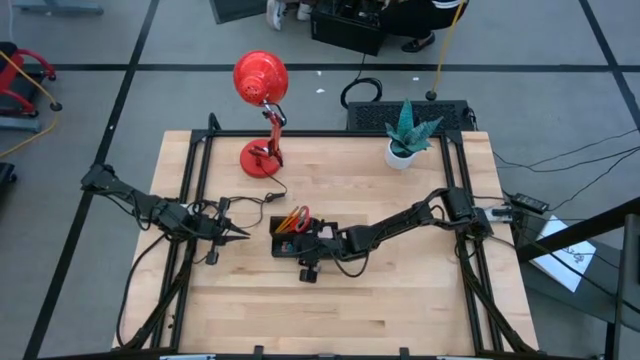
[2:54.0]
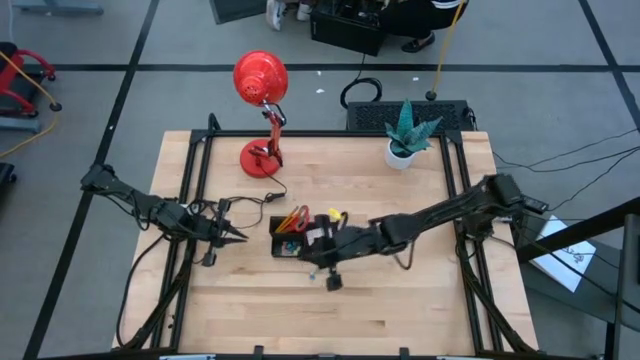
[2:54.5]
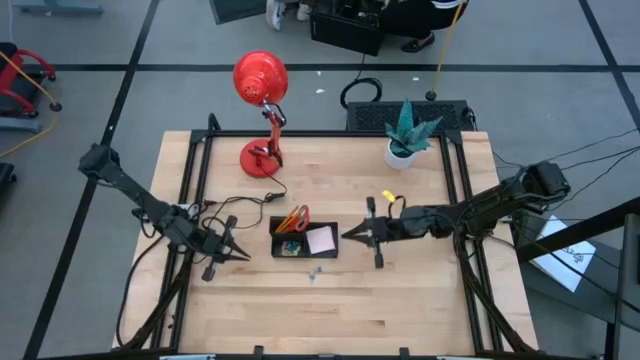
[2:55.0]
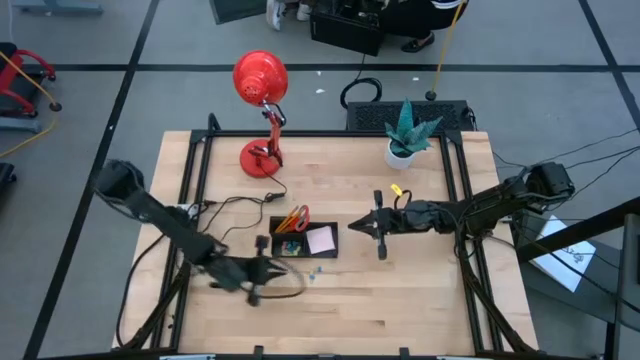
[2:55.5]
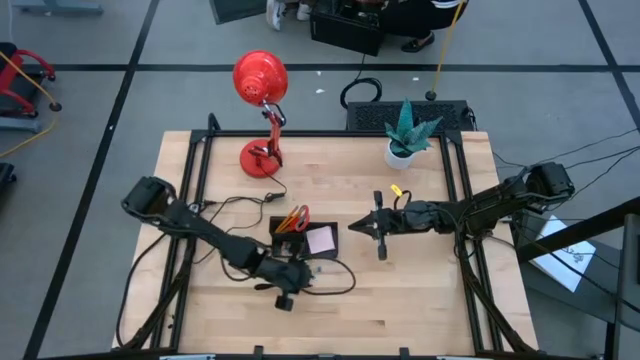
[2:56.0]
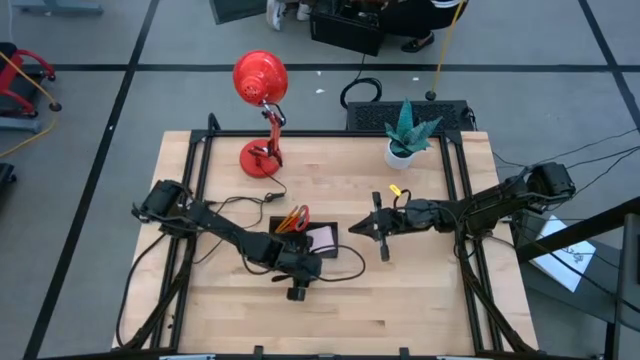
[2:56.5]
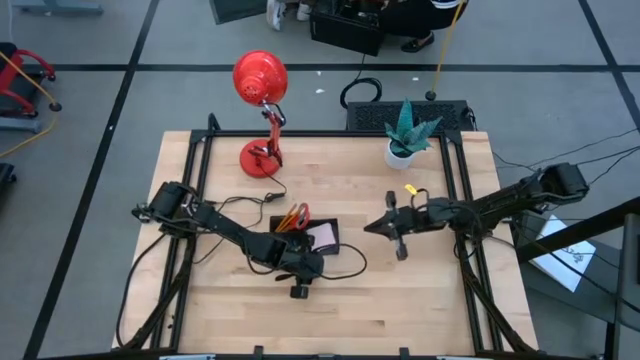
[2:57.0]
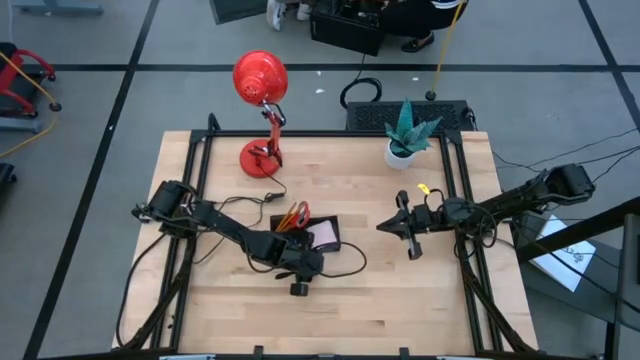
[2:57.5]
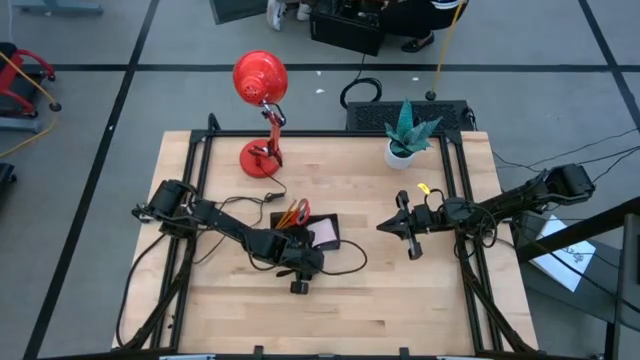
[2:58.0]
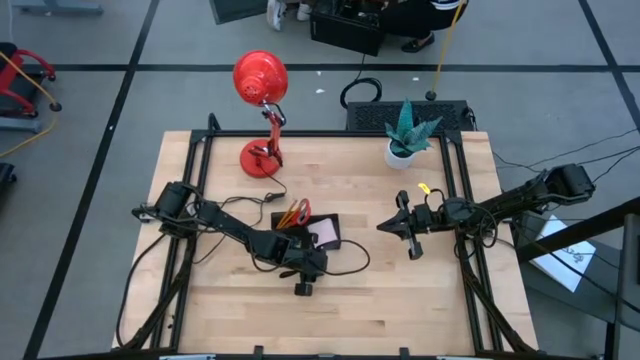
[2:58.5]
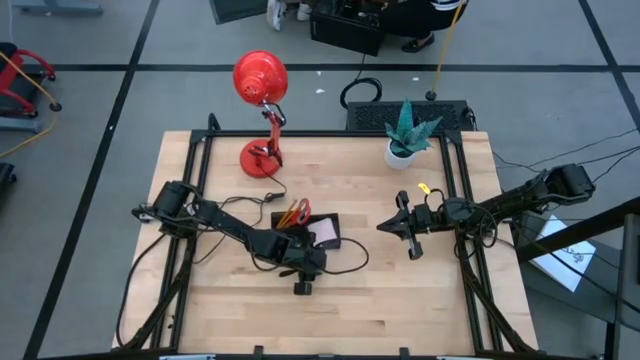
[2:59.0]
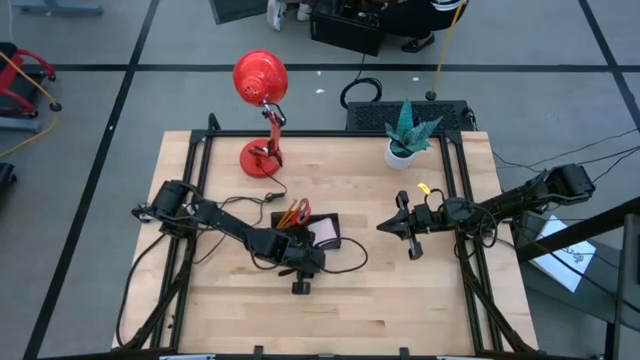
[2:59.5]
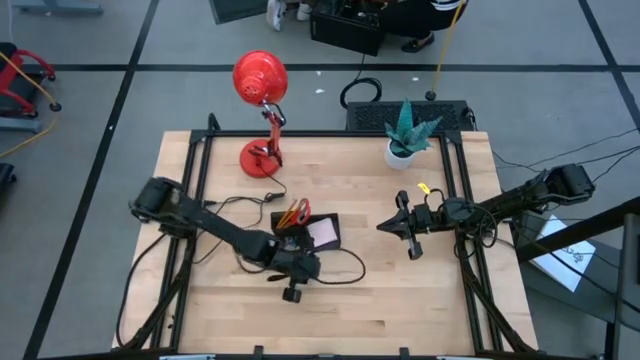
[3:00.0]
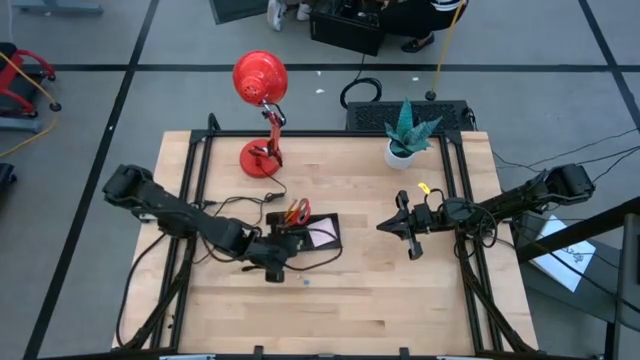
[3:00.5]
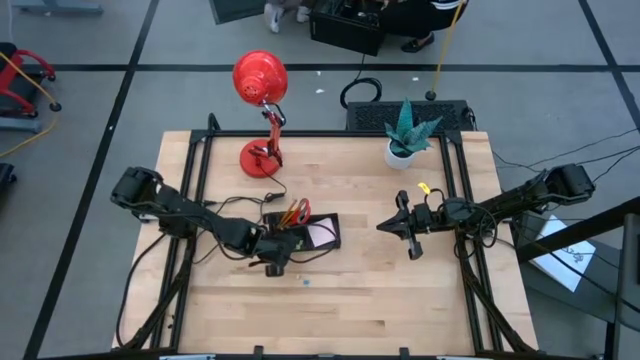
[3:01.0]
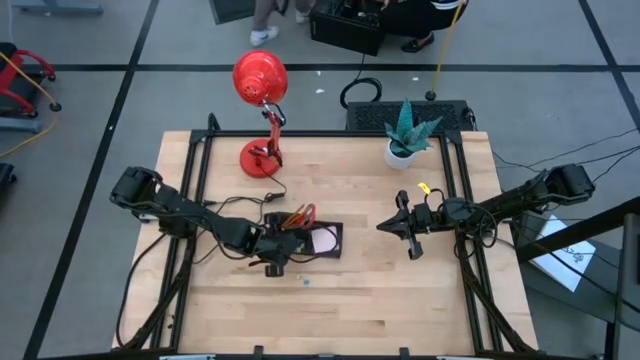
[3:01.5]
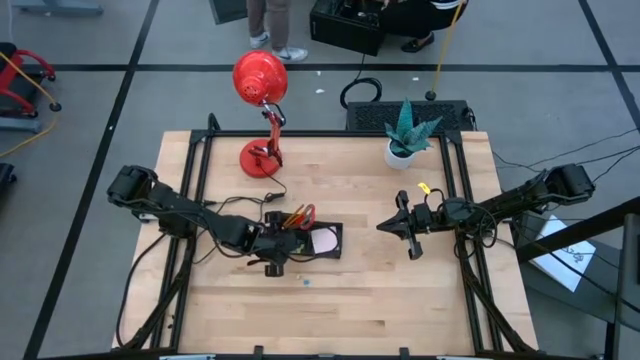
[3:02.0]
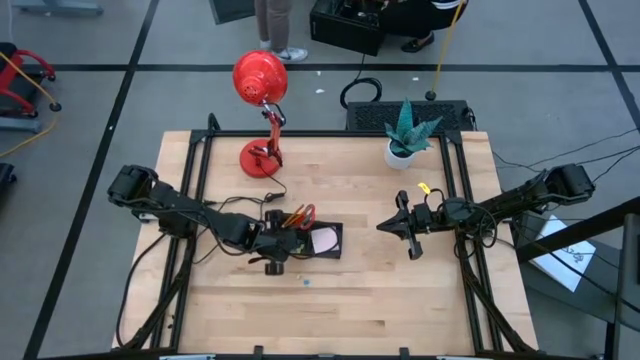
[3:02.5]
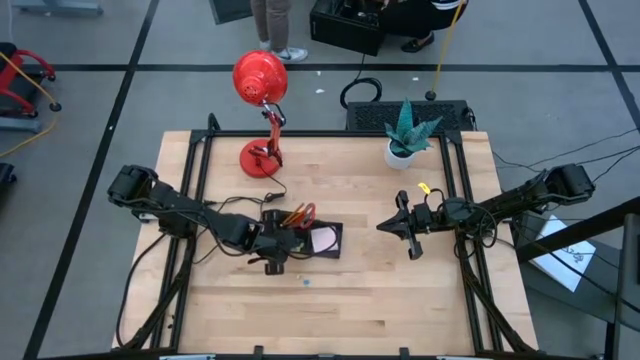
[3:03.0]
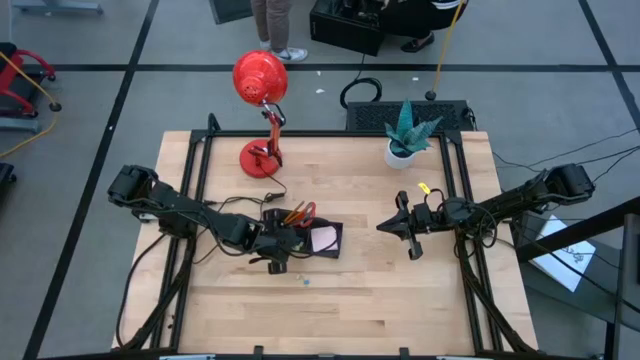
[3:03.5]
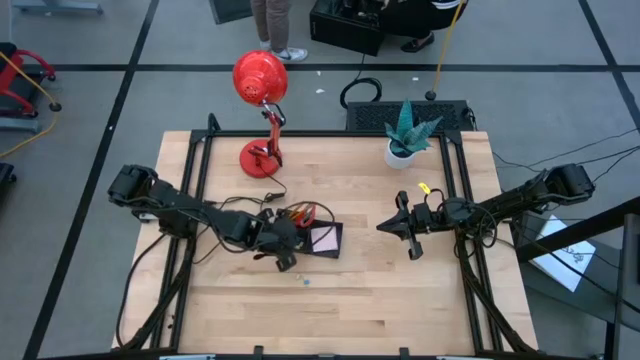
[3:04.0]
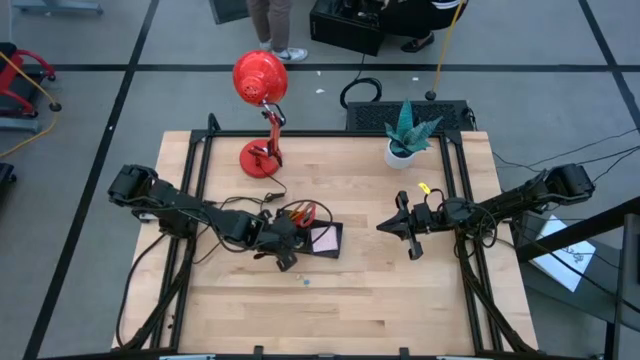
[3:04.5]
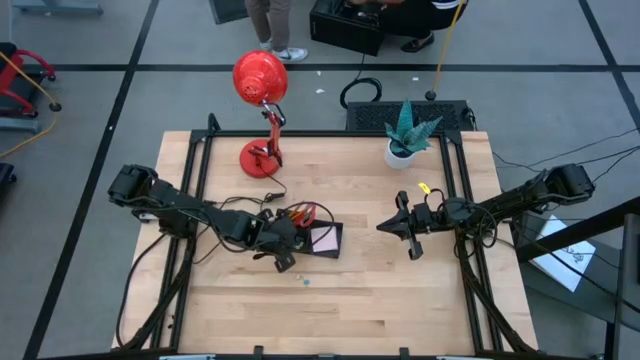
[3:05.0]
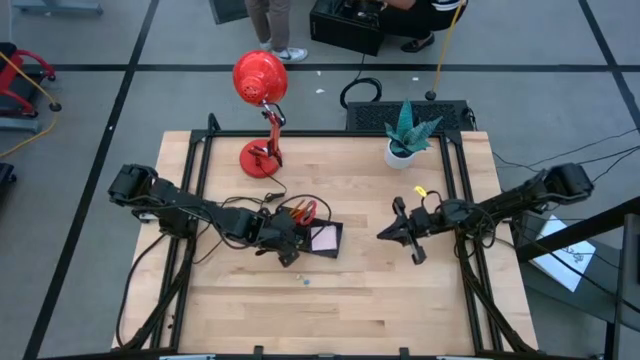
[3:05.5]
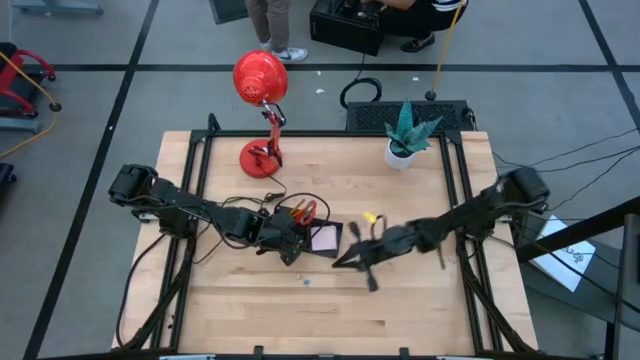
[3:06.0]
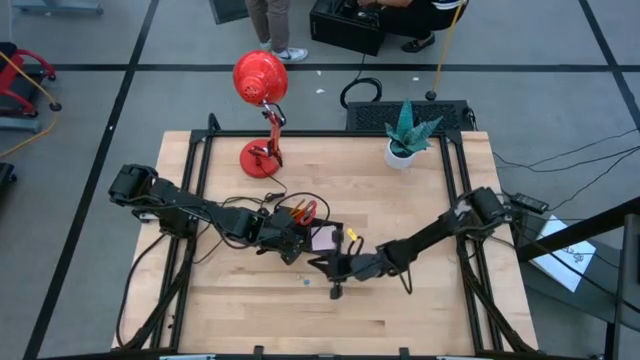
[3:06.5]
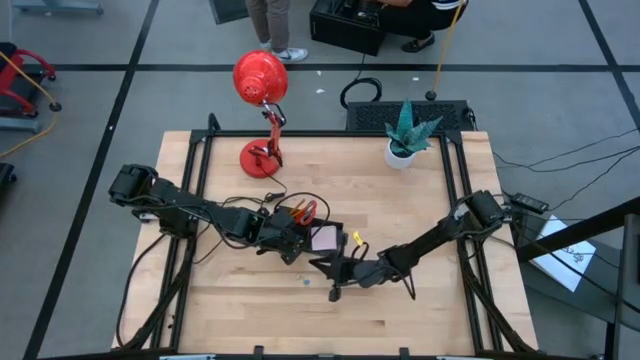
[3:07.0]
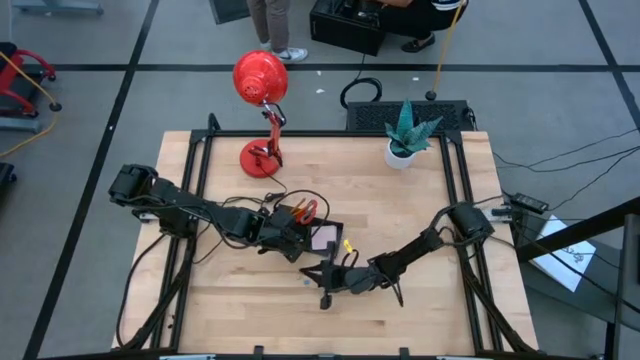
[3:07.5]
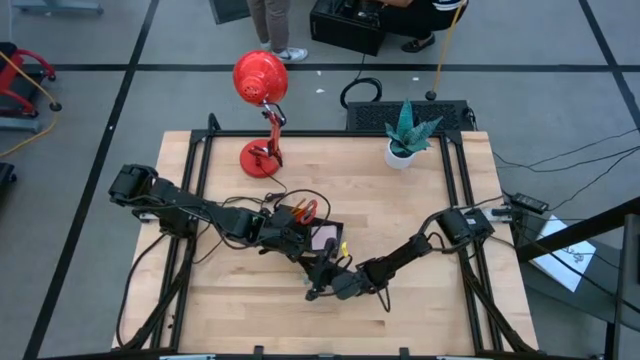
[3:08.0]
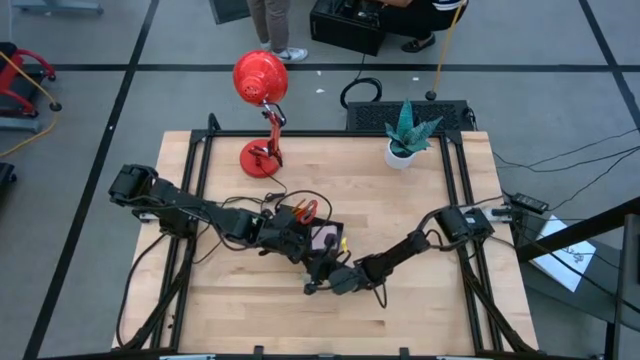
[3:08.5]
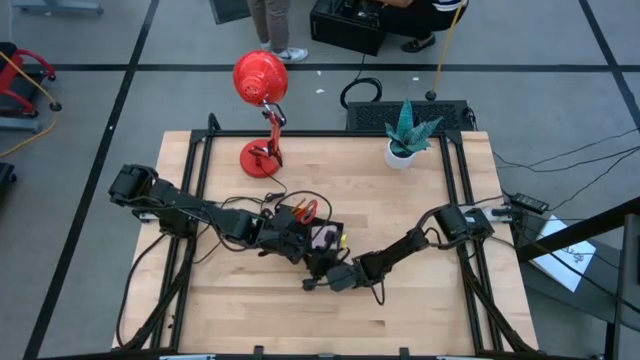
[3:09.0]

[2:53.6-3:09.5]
Task: Pick and place office supplies into organizer
Put the blue binder clip into the desk organizer

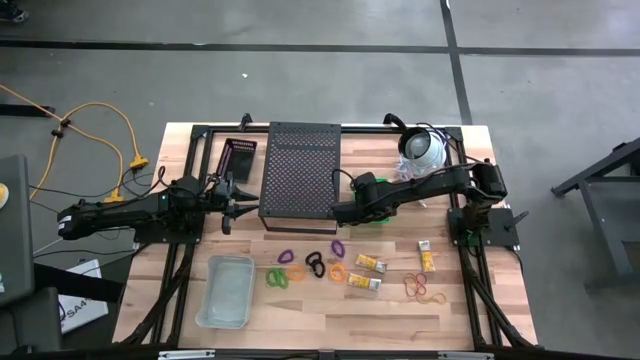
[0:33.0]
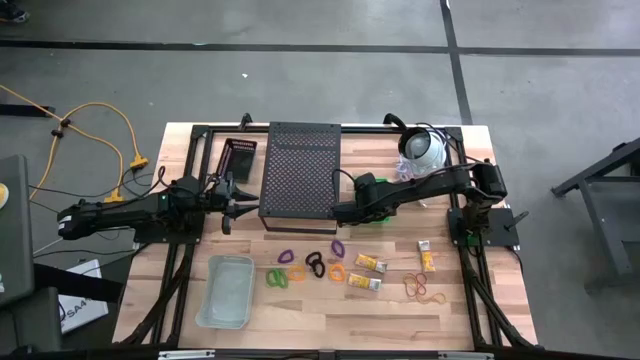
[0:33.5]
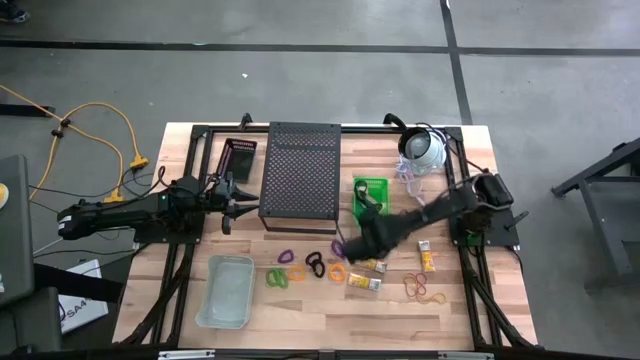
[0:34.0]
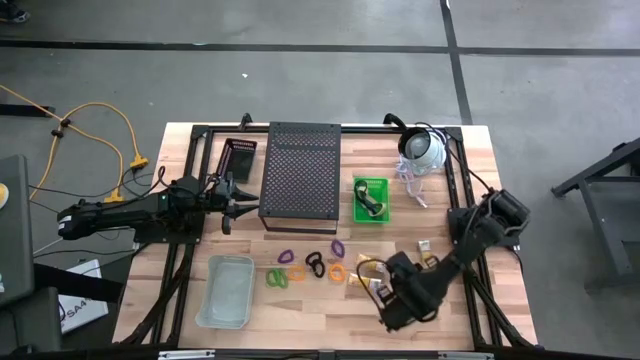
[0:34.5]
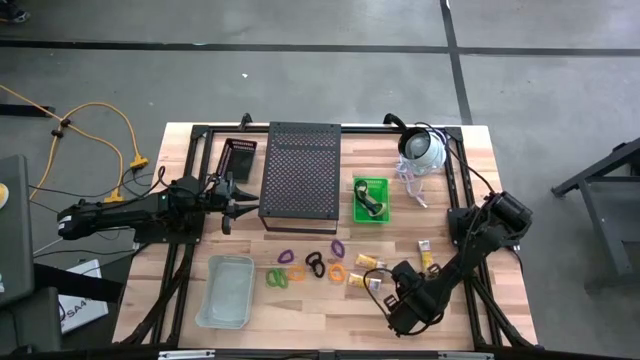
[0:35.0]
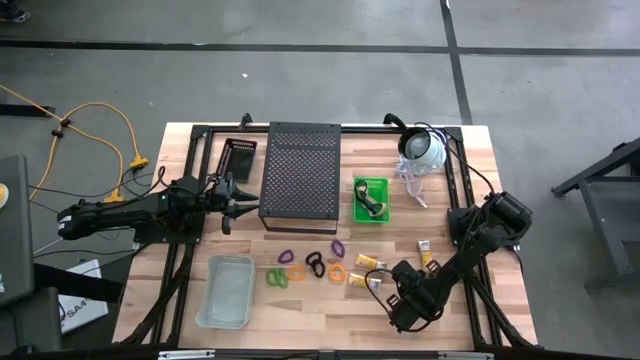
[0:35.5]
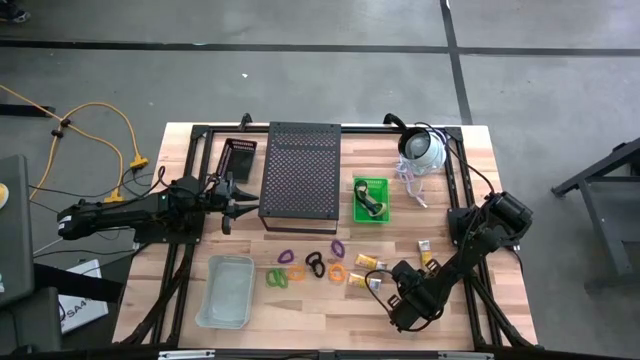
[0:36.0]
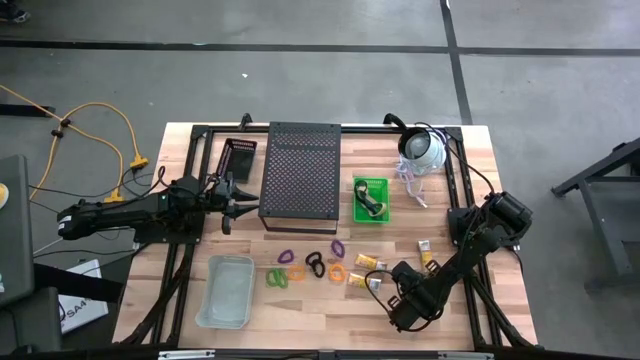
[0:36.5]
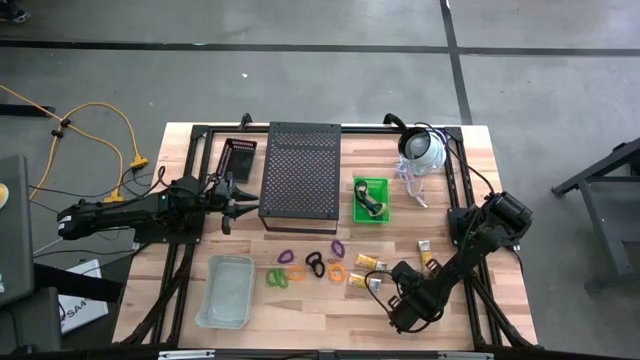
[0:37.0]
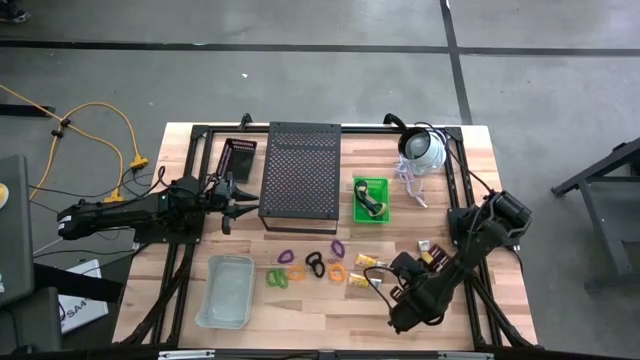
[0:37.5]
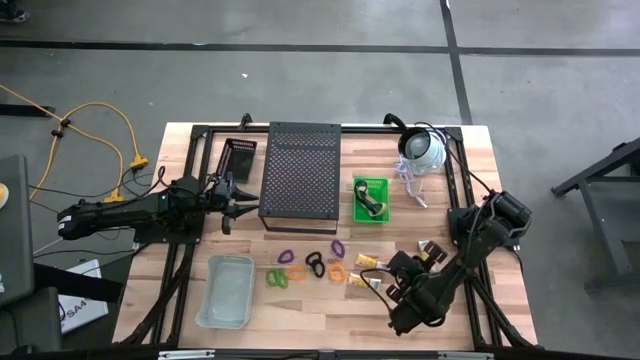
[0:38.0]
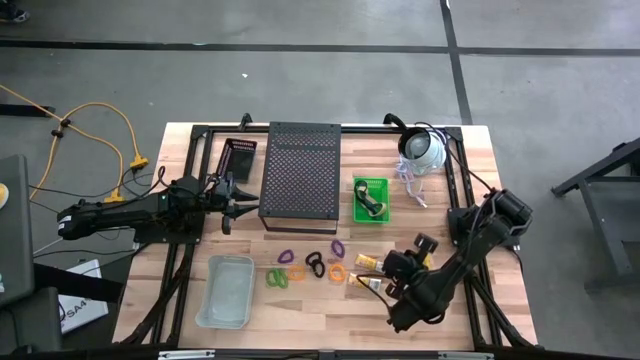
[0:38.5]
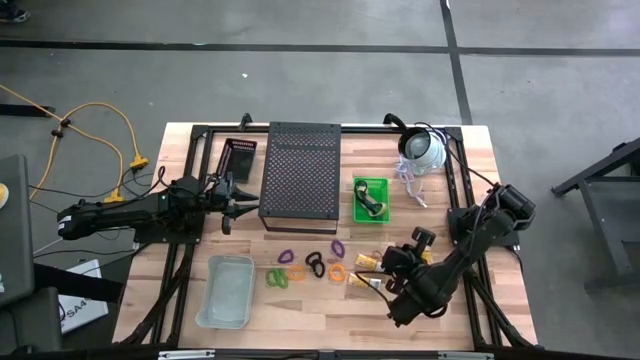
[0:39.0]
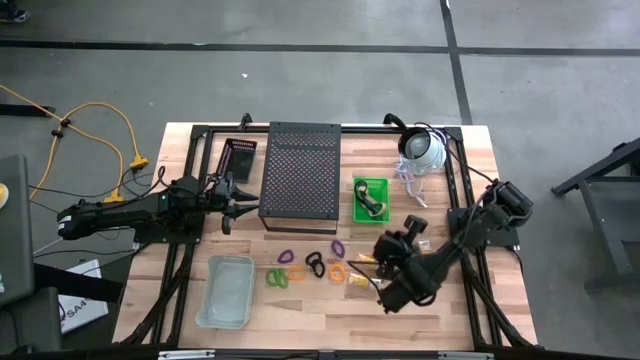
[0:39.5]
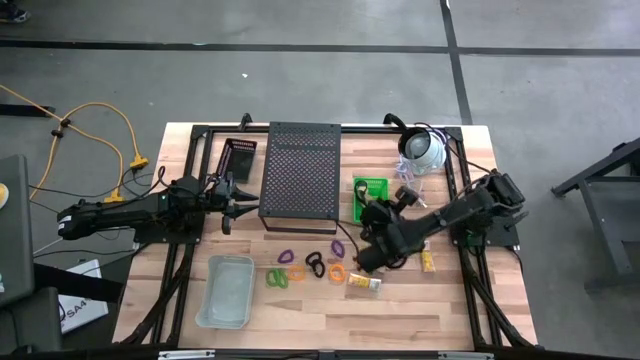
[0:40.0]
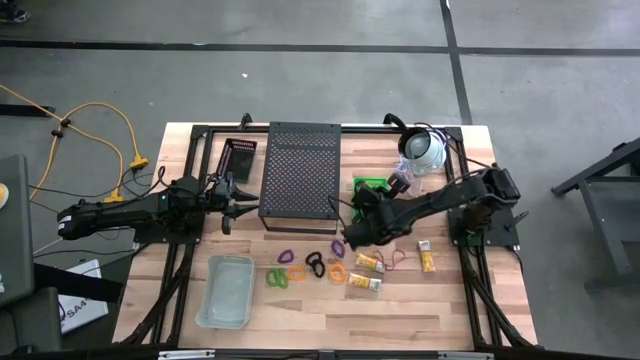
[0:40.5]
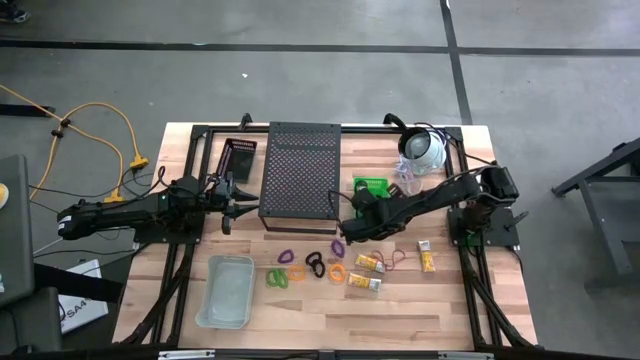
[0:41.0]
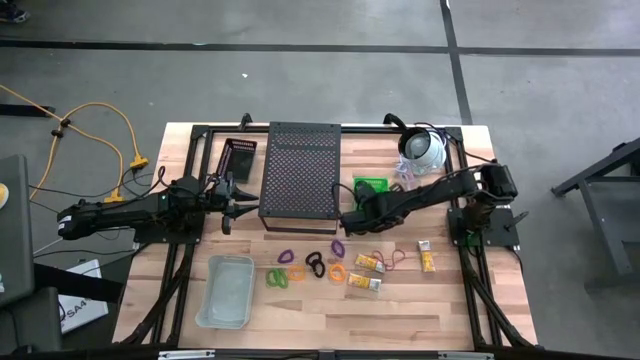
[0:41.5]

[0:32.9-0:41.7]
Task: Pick & Place Office Desk Supplies
Put the yellow rubber band into the green basket
